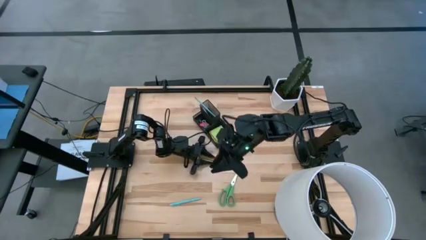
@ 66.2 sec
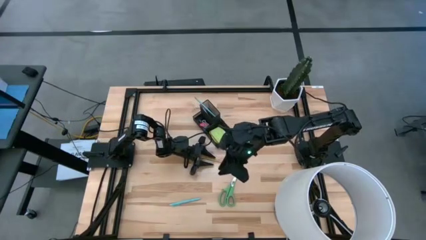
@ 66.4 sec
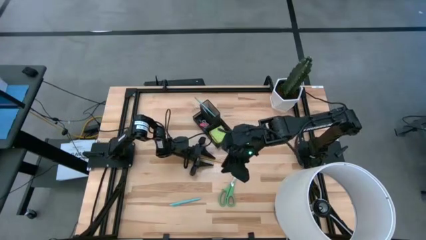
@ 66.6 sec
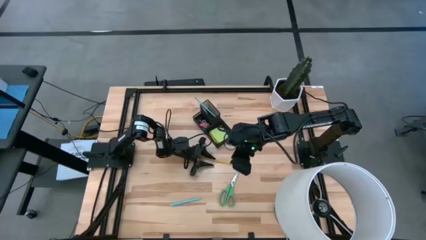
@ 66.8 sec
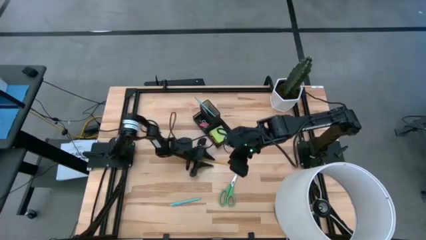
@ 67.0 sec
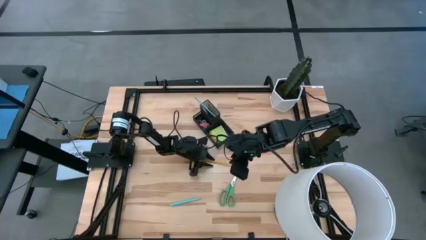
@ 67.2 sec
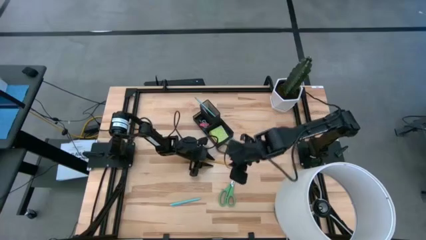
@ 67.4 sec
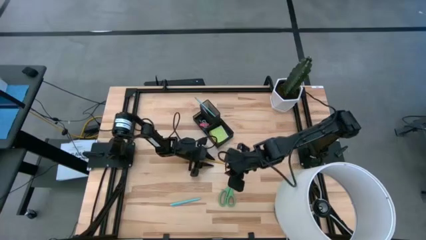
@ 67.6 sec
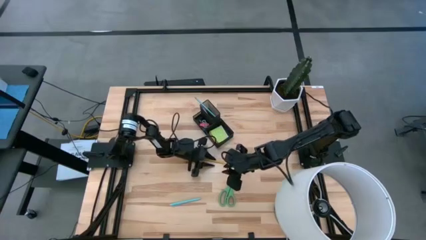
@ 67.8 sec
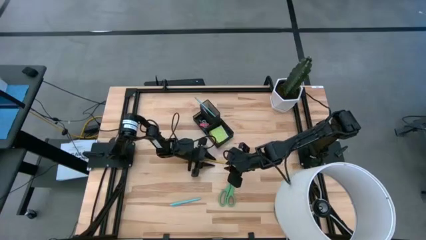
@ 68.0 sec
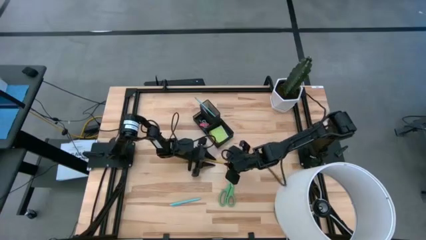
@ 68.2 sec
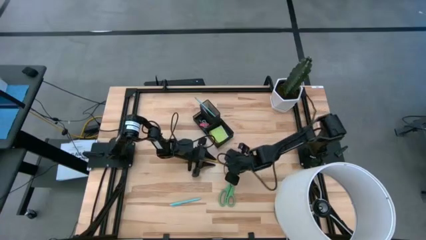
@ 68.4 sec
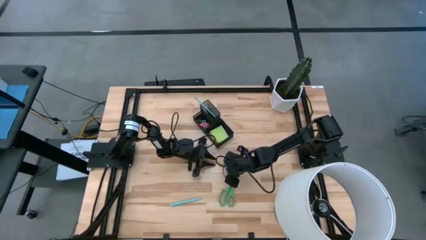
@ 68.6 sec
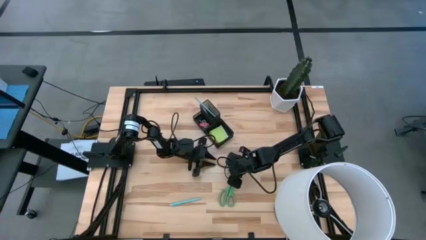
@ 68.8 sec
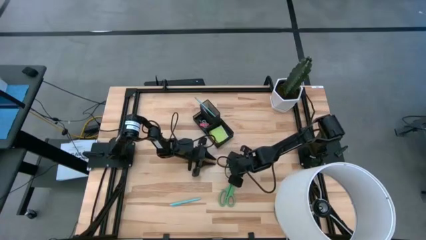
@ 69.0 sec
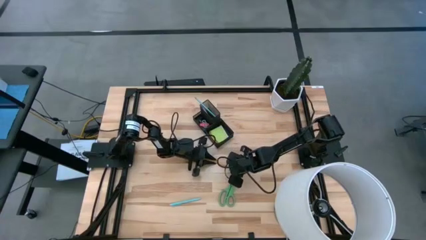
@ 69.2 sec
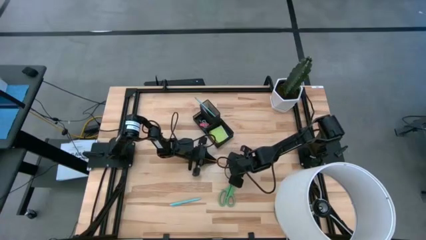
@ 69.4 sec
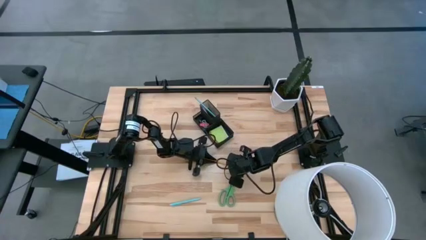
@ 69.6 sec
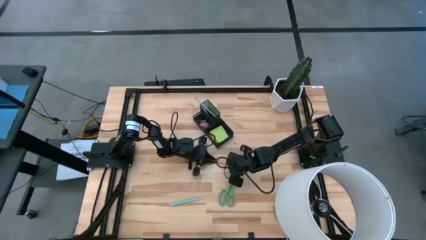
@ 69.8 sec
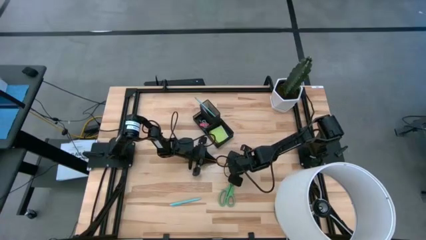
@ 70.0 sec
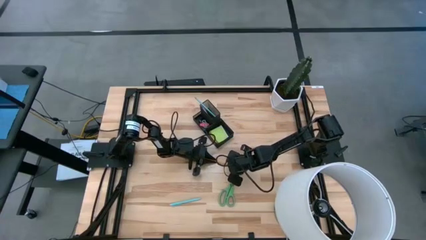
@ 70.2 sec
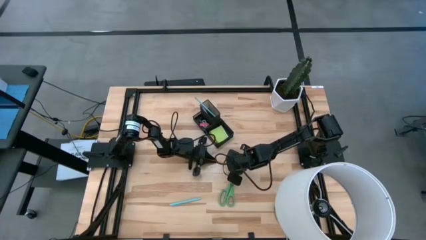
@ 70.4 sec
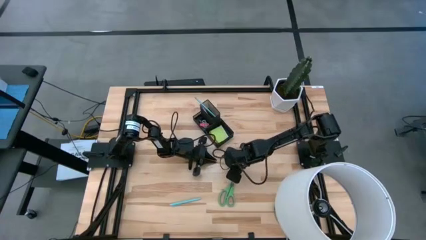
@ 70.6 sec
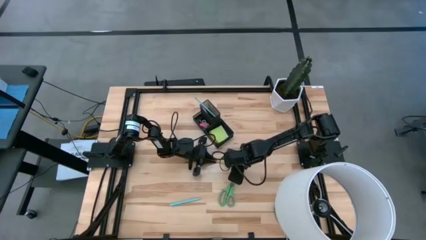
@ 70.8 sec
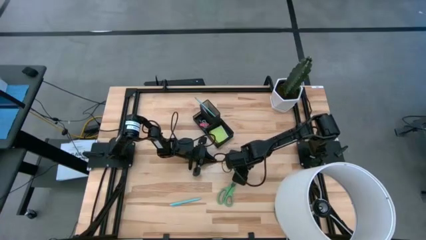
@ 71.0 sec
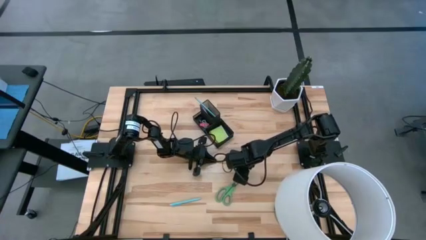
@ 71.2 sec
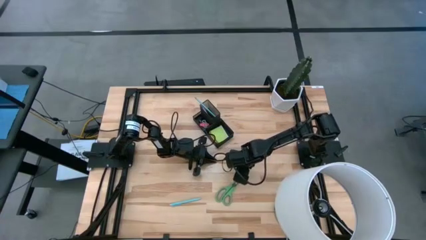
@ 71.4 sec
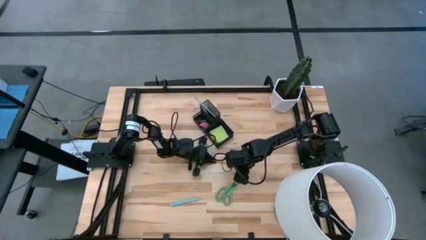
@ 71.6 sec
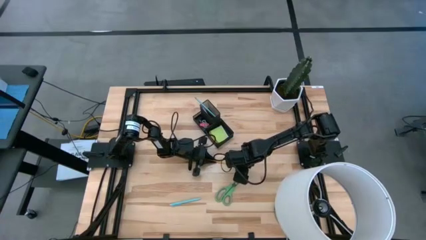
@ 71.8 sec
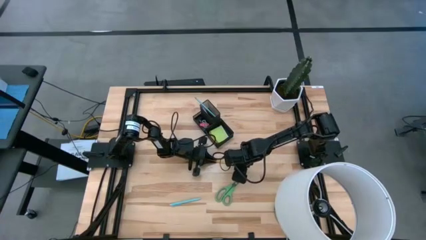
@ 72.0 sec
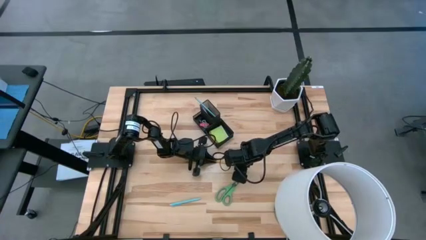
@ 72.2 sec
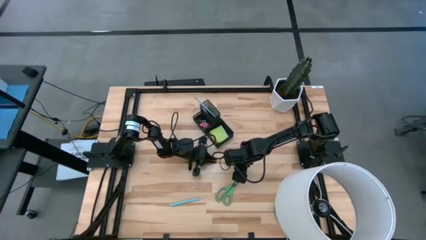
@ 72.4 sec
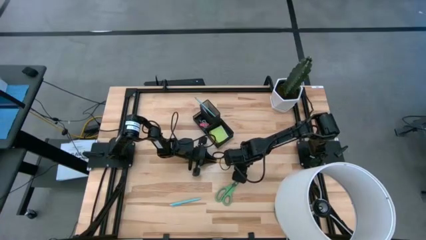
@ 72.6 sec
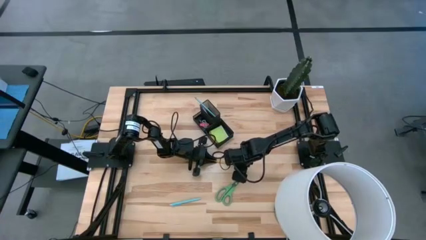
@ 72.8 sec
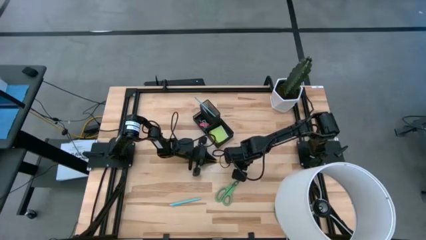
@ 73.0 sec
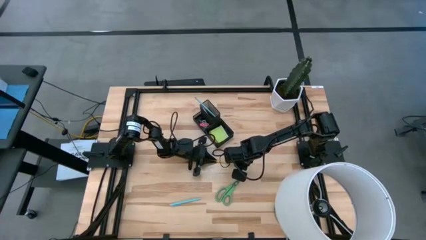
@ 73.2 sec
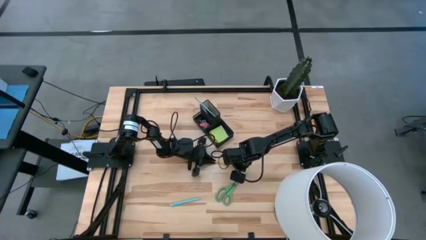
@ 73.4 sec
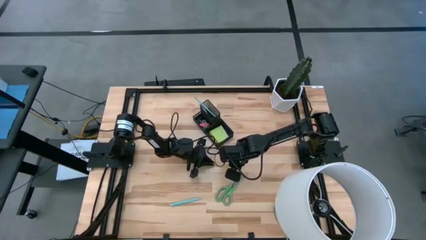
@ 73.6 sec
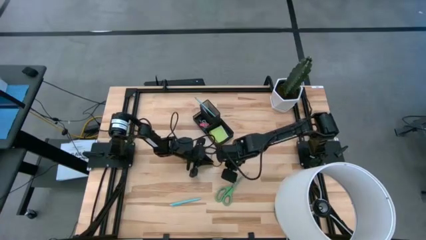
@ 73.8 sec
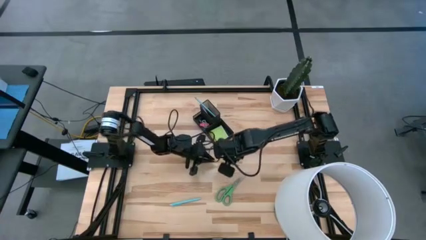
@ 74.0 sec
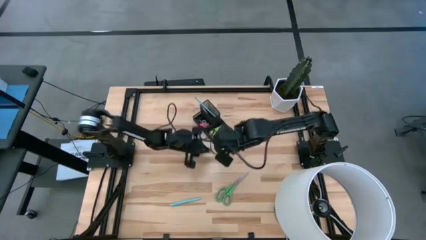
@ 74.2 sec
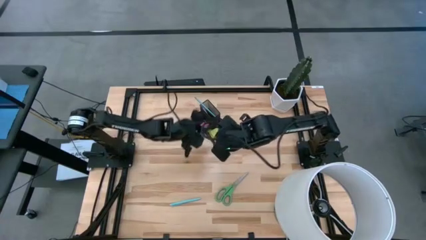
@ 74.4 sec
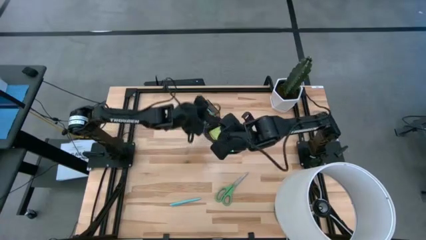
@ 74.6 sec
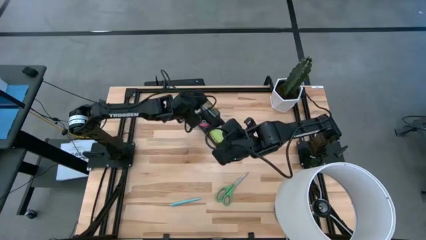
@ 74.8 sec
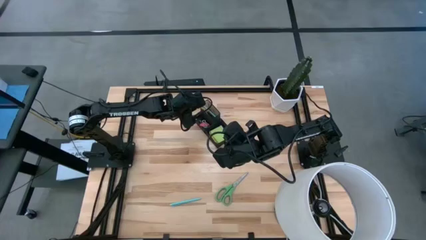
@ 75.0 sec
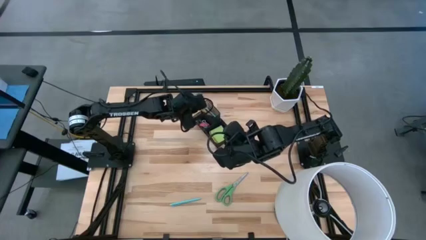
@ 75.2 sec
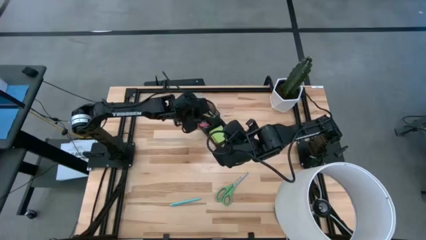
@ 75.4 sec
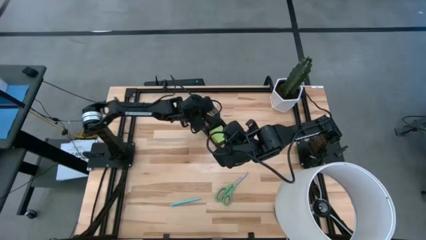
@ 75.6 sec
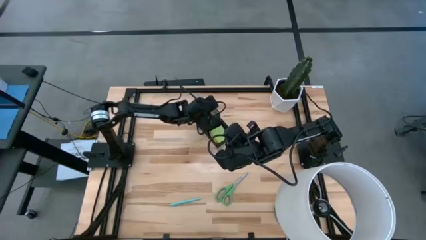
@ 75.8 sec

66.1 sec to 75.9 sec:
Task: Pick and place office supplies into organizer
Put the yellow pencil into the black desk organizer

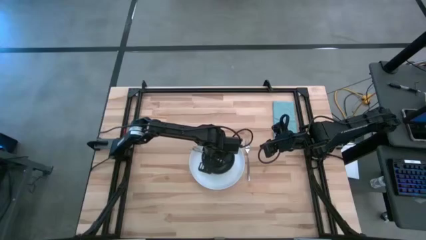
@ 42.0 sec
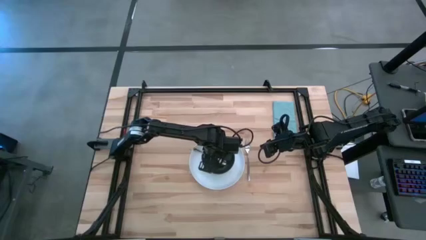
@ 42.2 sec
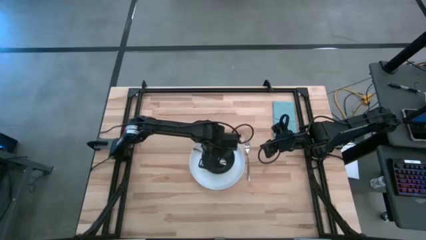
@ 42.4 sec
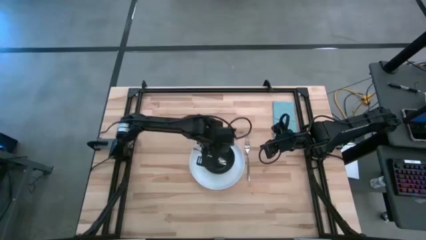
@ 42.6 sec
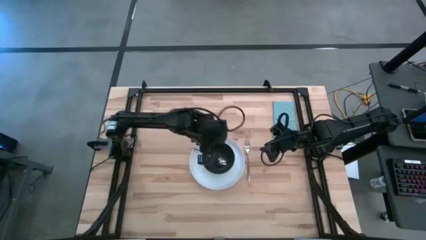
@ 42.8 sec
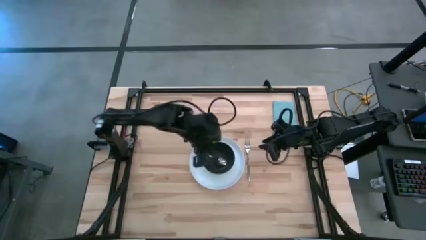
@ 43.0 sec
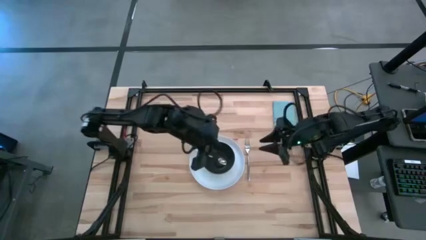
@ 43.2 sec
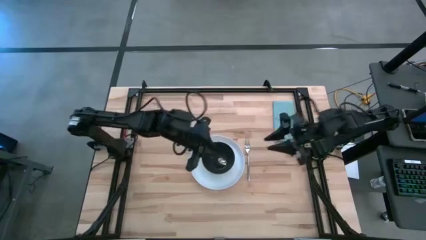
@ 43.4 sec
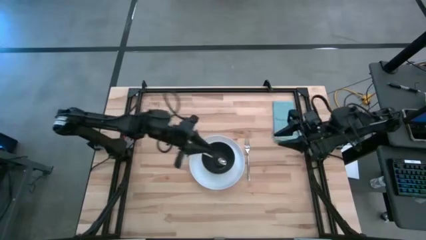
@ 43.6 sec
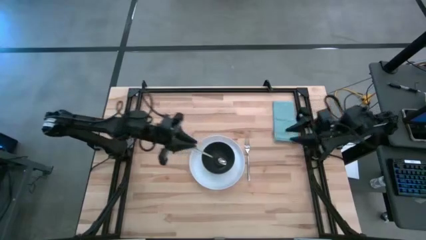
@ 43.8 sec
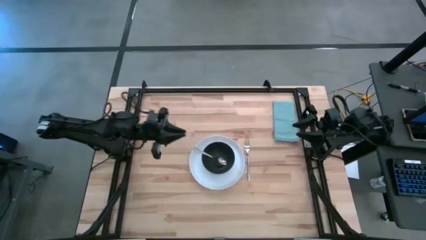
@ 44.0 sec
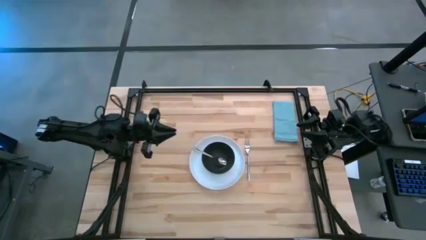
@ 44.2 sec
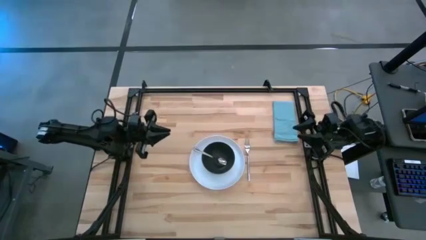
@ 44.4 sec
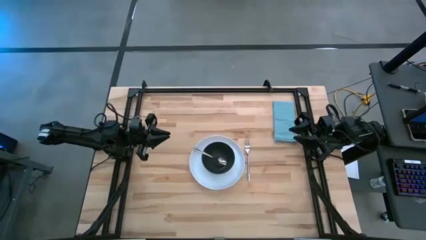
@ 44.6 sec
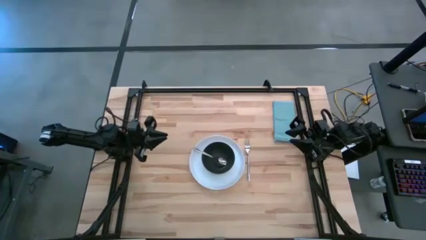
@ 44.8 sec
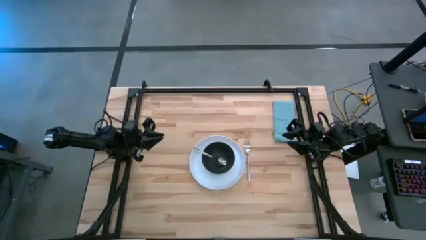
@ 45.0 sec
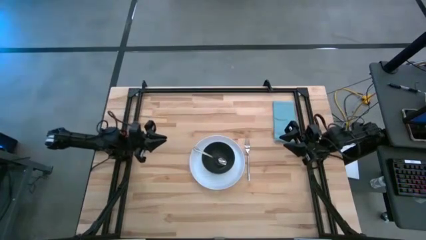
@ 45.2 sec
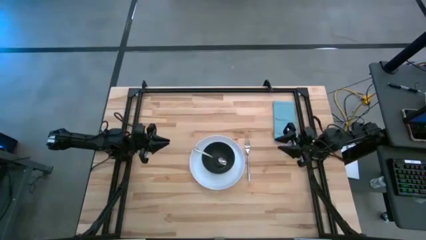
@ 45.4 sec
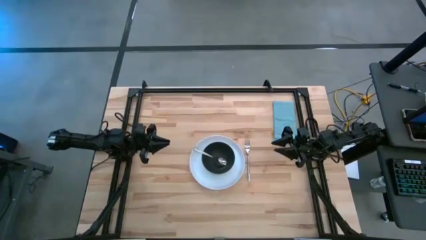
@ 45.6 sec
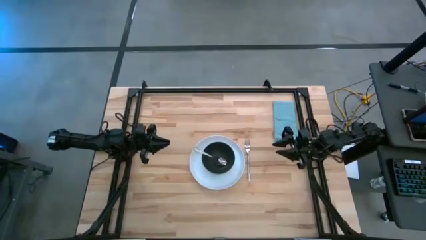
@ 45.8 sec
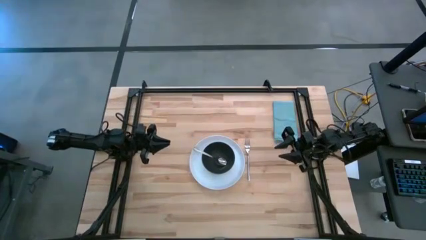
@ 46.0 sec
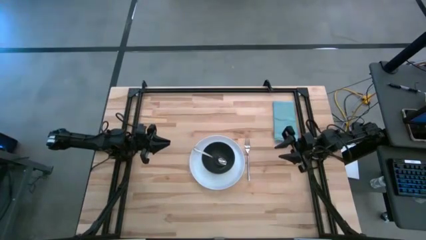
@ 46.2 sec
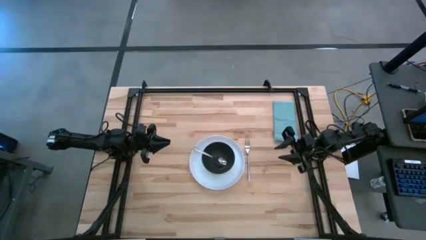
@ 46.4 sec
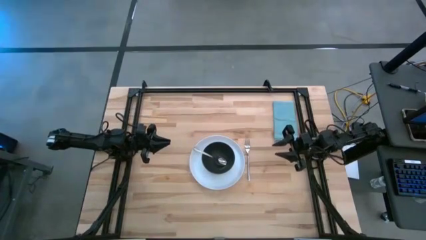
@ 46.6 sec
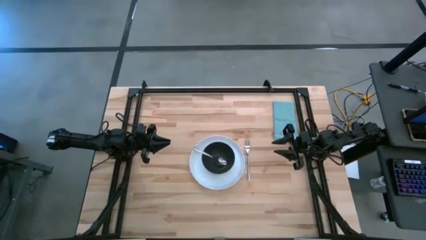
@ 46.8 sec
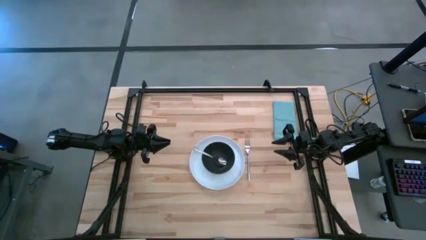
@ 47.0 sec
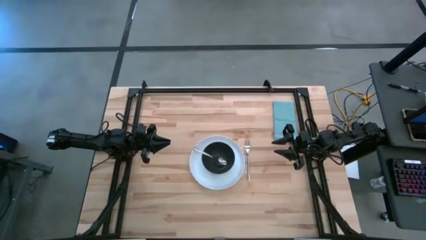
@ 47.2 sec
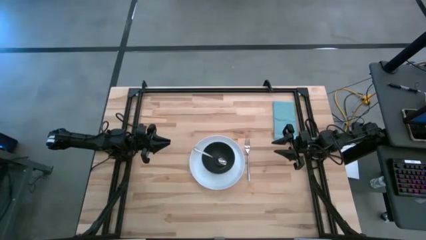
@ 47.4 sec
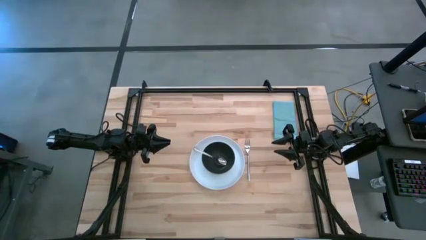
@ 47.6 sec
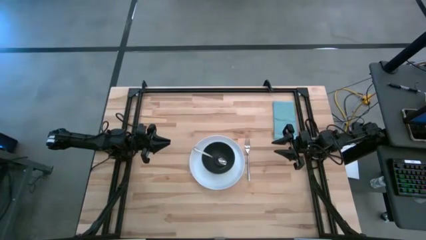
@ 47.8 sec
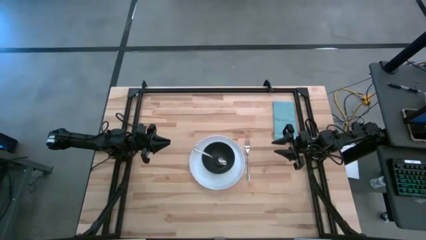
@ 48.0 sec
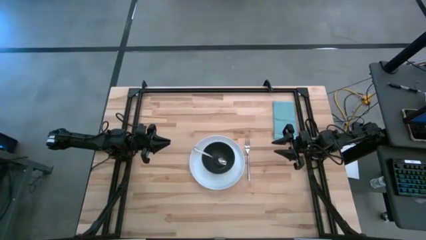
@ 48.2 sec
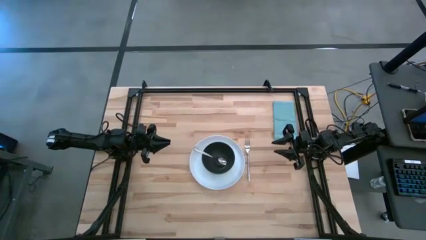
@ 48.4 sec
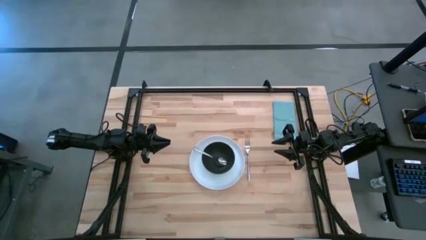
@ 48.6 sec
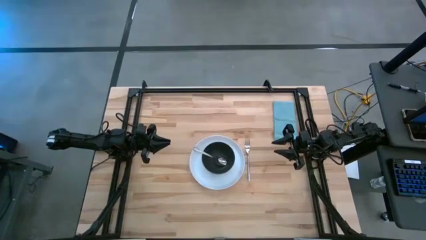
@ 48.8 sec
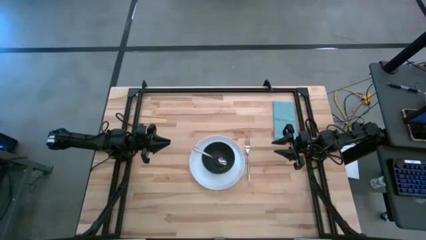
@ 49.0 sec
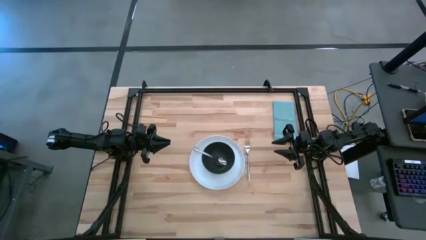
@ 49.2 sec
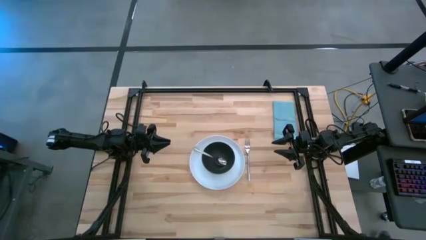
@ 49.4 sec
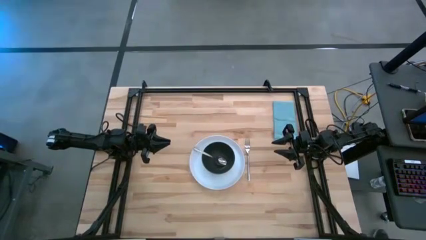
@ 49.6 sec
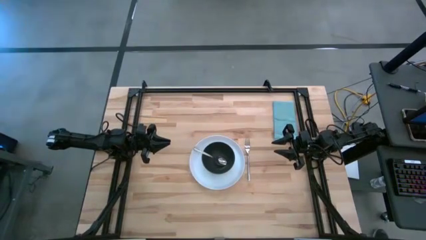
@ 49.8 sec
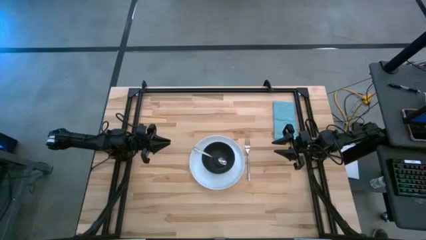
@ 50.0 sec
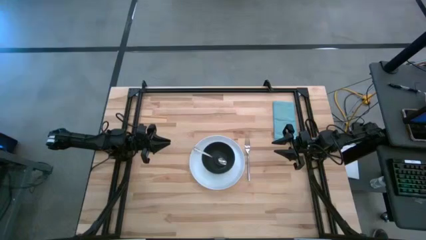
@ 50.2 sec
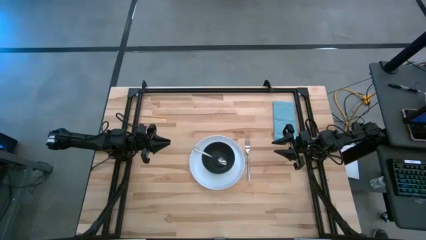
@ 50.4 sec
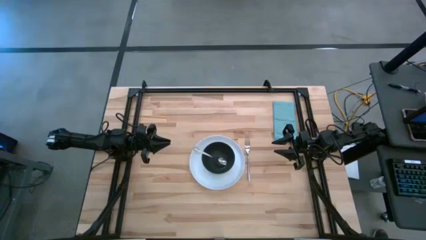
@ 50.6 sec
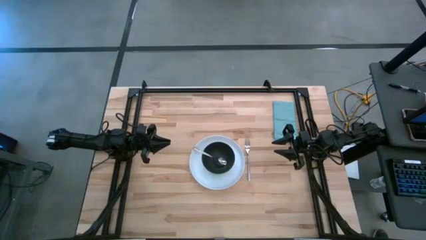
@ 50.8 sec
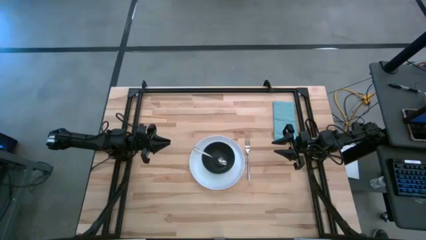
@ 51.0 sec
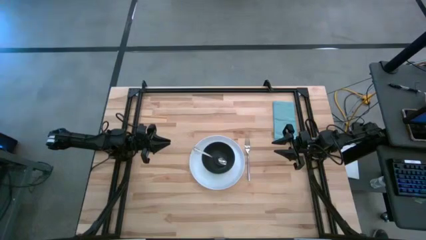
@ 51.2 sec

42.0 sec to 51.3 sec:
Task: Set table place
Return to Home Position
